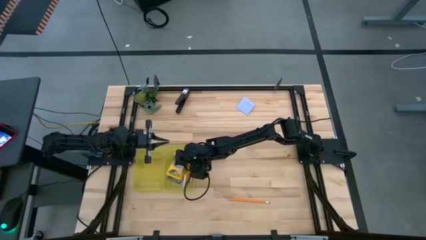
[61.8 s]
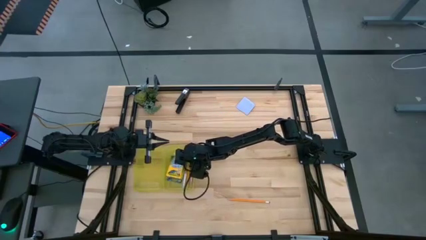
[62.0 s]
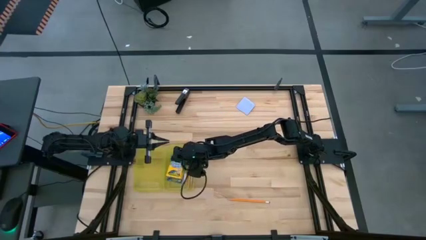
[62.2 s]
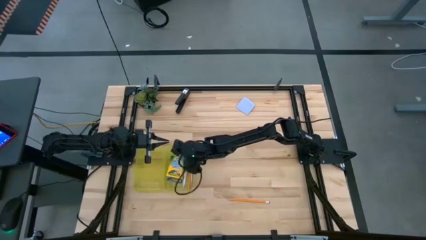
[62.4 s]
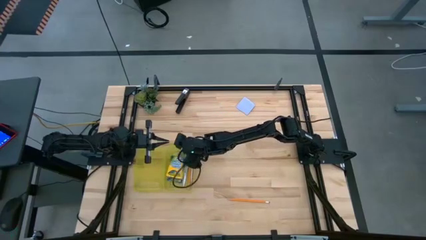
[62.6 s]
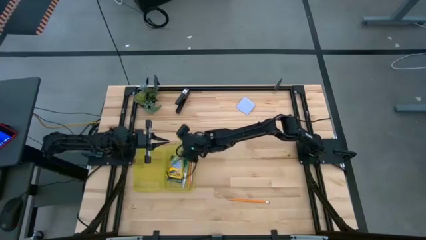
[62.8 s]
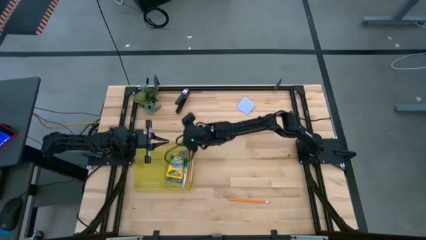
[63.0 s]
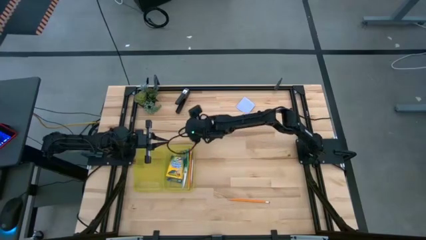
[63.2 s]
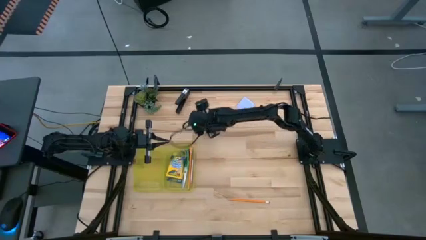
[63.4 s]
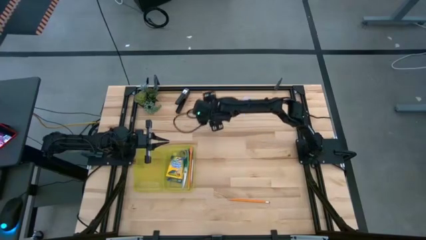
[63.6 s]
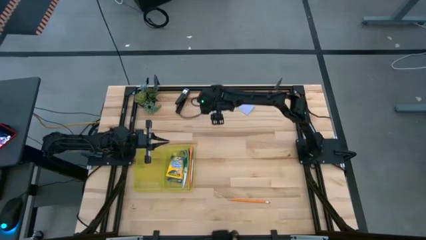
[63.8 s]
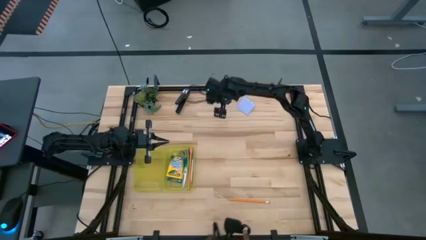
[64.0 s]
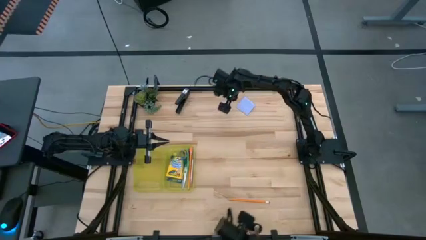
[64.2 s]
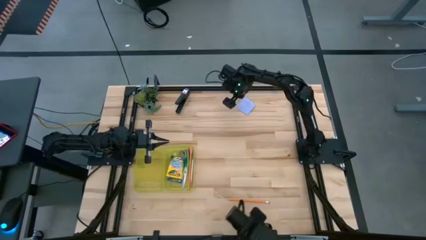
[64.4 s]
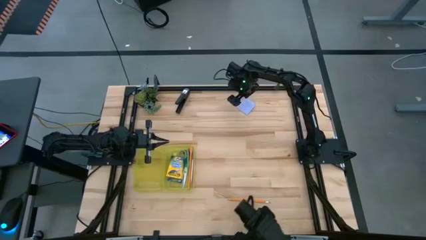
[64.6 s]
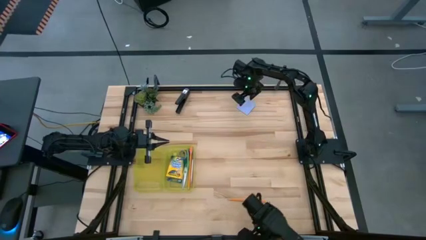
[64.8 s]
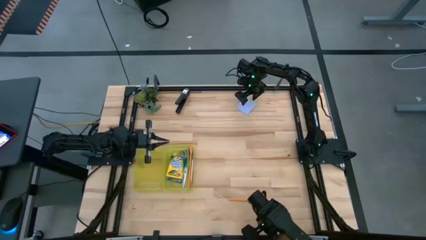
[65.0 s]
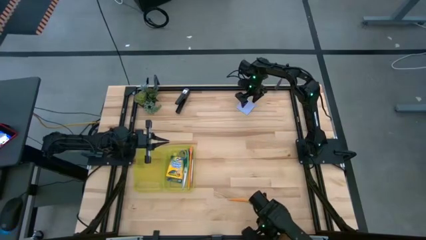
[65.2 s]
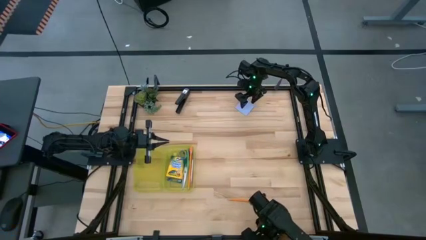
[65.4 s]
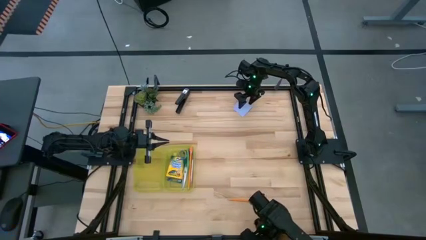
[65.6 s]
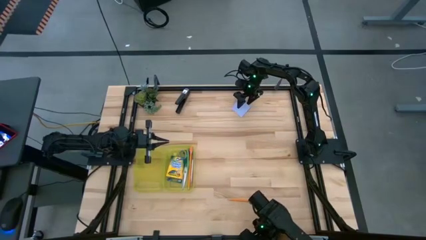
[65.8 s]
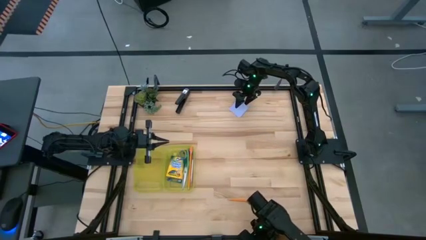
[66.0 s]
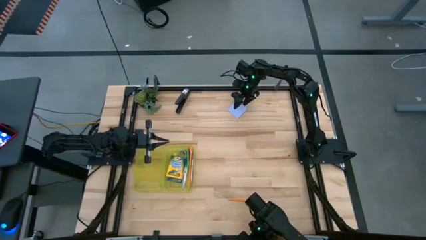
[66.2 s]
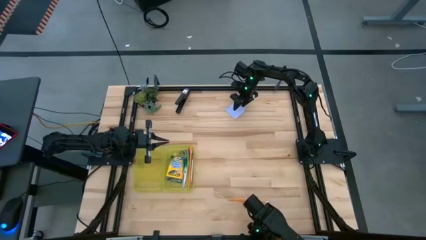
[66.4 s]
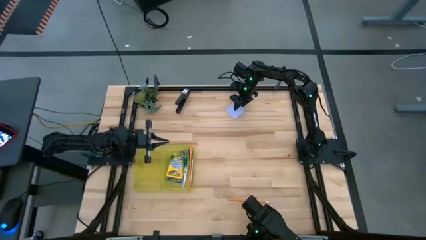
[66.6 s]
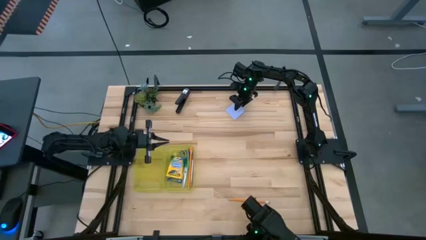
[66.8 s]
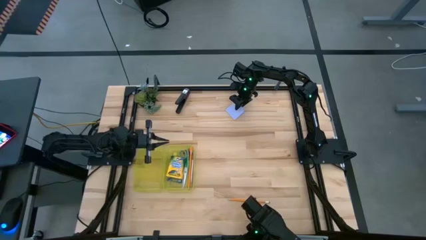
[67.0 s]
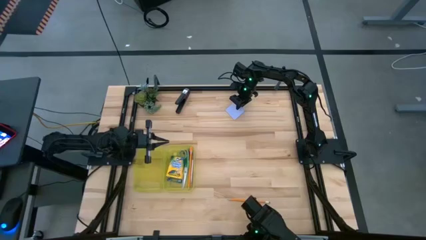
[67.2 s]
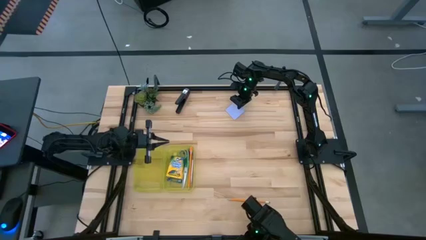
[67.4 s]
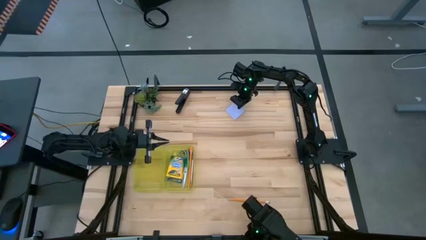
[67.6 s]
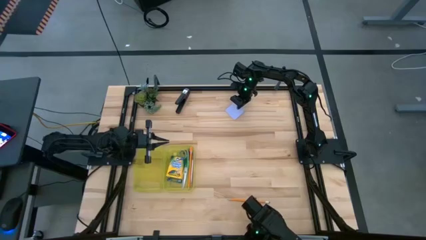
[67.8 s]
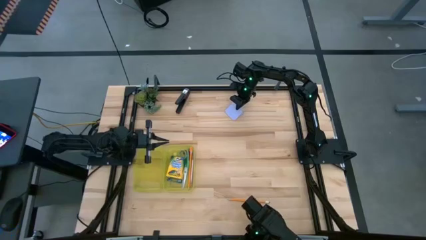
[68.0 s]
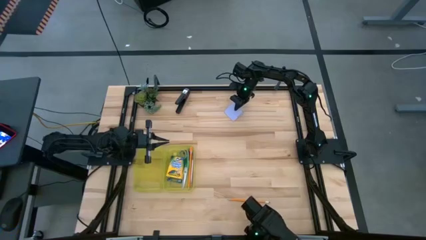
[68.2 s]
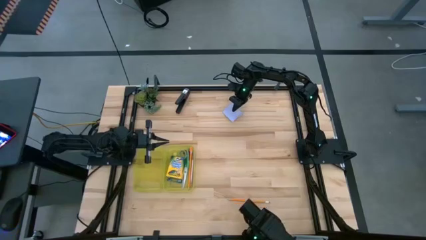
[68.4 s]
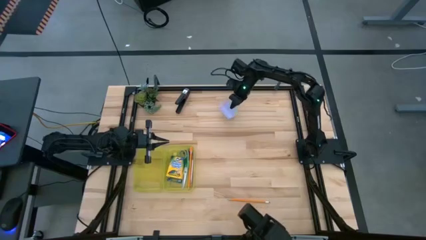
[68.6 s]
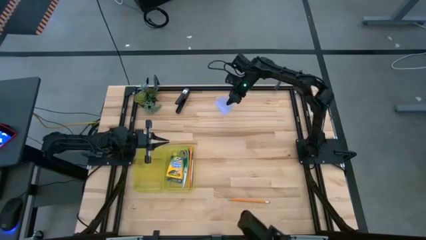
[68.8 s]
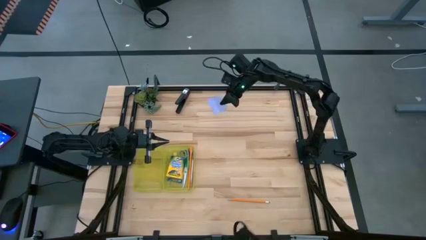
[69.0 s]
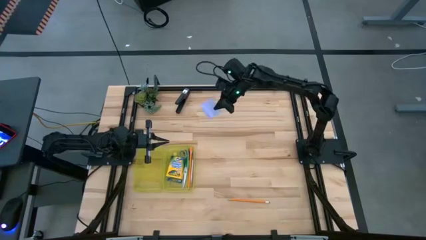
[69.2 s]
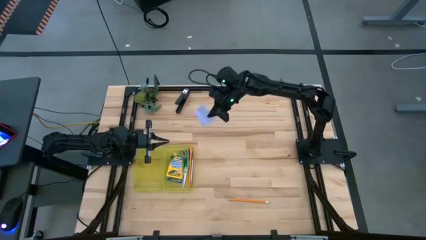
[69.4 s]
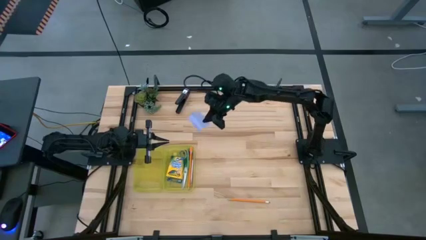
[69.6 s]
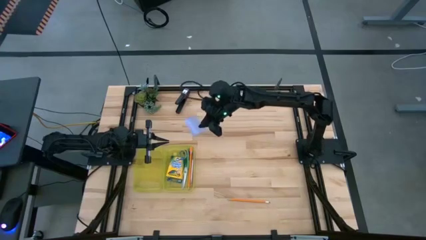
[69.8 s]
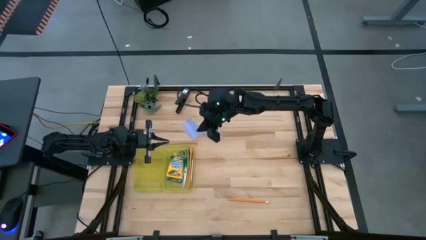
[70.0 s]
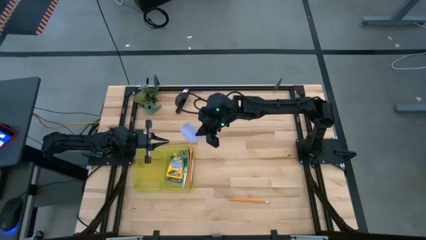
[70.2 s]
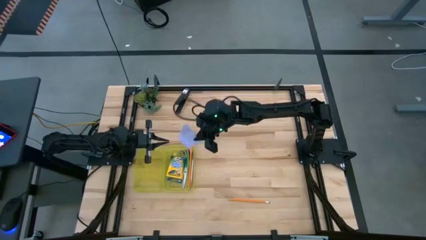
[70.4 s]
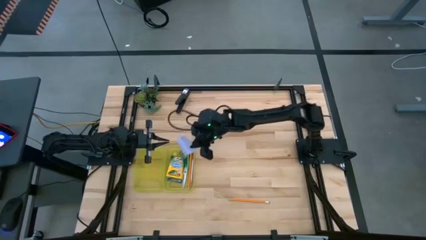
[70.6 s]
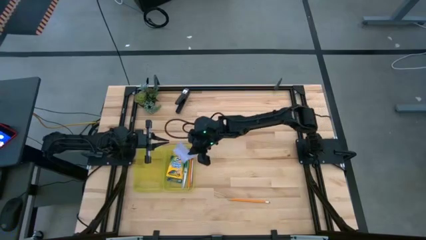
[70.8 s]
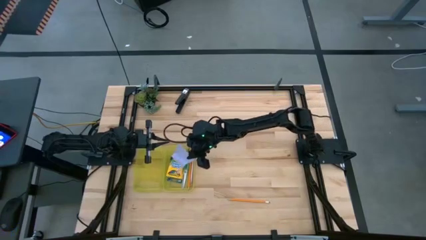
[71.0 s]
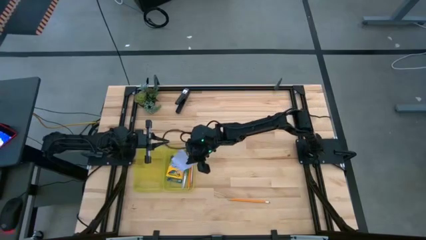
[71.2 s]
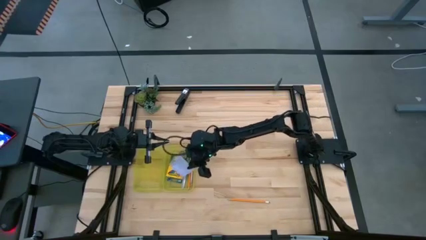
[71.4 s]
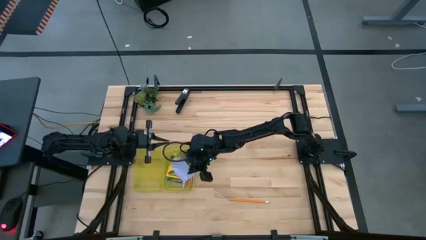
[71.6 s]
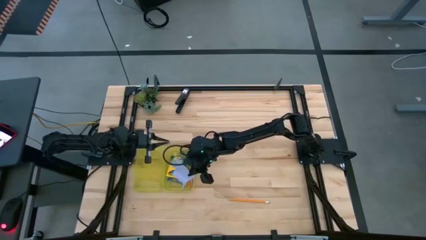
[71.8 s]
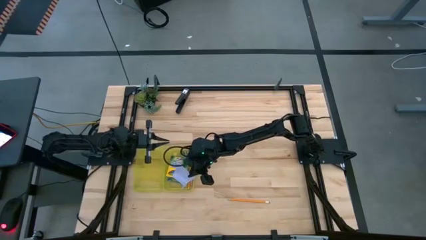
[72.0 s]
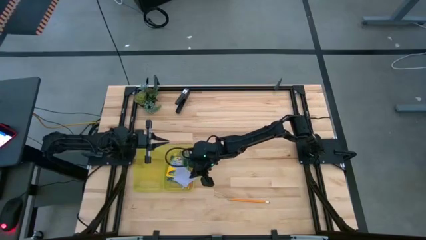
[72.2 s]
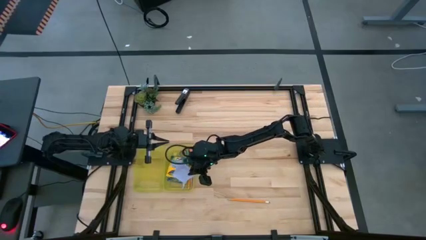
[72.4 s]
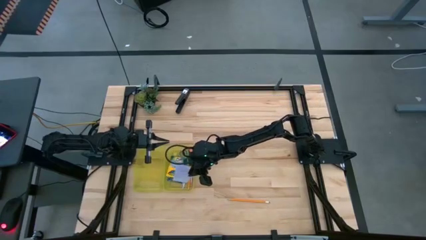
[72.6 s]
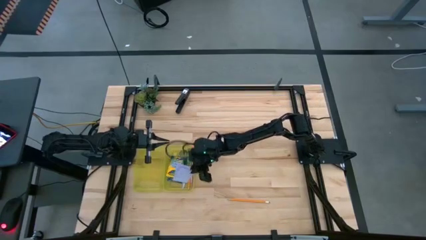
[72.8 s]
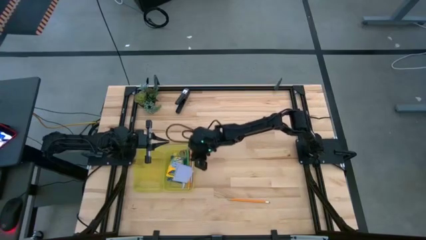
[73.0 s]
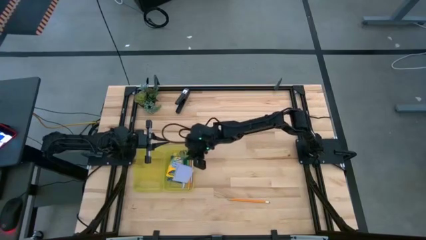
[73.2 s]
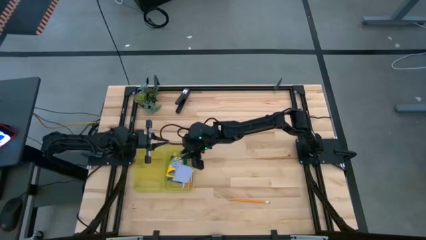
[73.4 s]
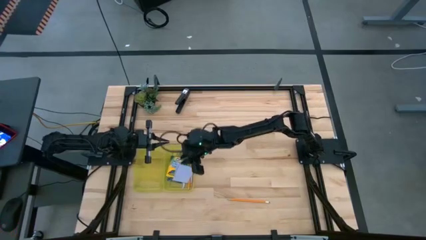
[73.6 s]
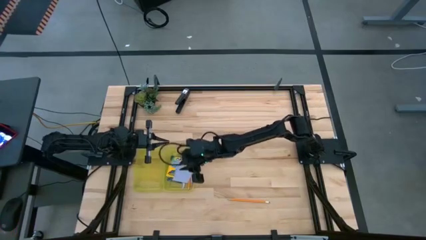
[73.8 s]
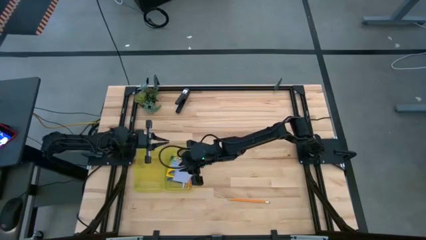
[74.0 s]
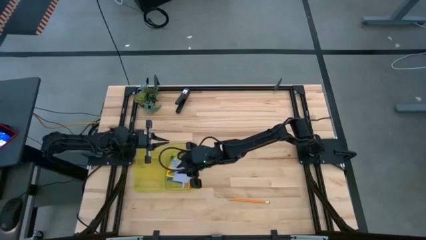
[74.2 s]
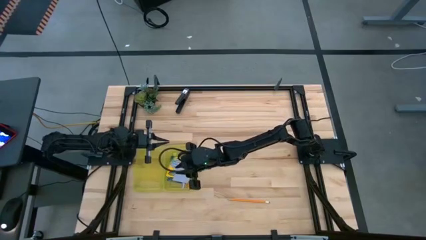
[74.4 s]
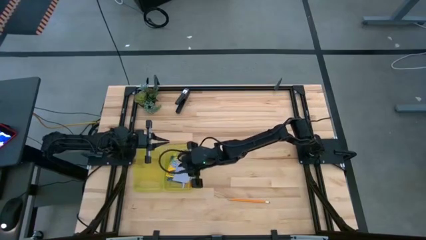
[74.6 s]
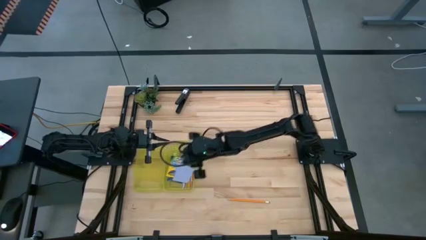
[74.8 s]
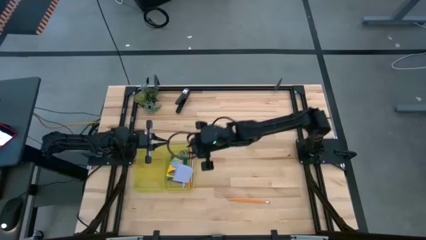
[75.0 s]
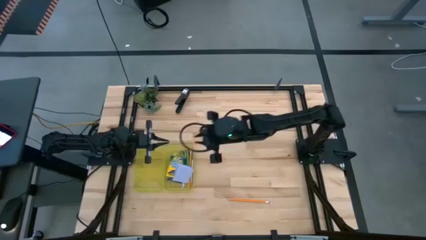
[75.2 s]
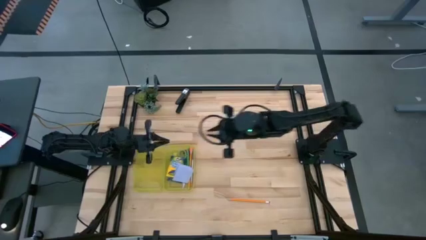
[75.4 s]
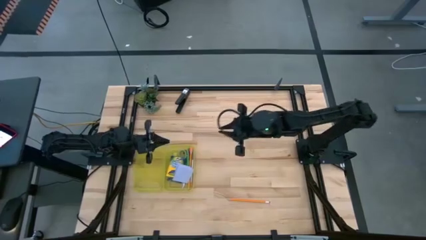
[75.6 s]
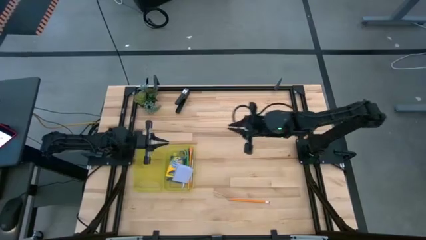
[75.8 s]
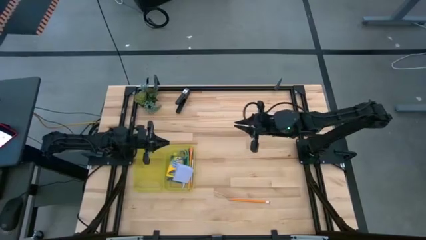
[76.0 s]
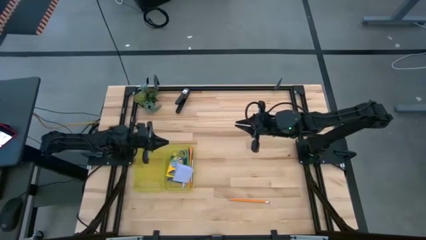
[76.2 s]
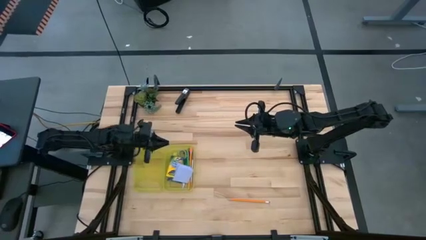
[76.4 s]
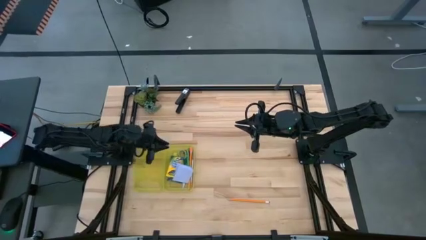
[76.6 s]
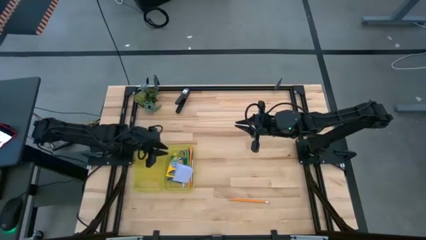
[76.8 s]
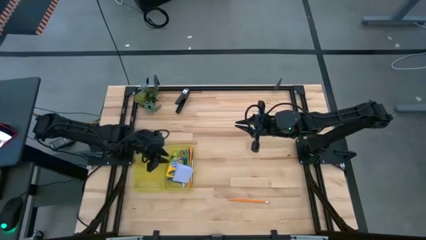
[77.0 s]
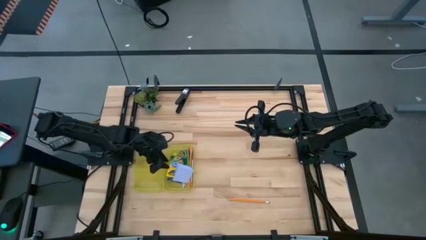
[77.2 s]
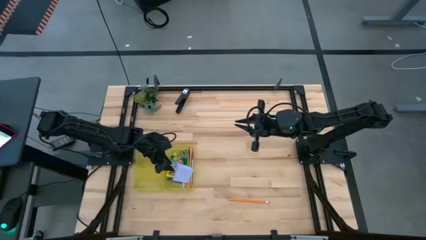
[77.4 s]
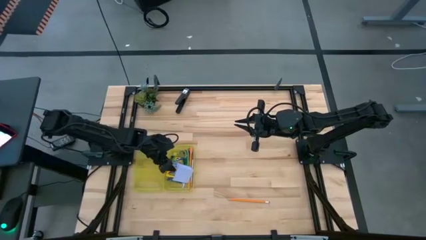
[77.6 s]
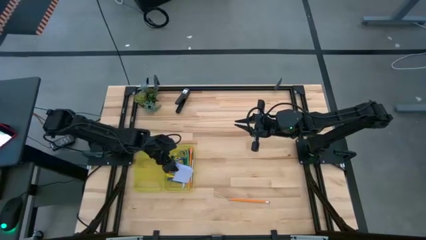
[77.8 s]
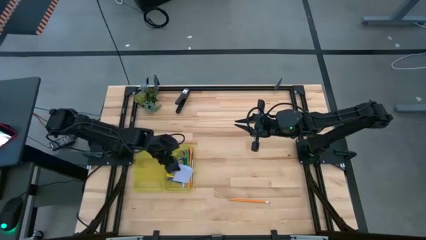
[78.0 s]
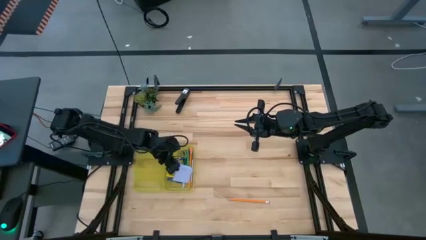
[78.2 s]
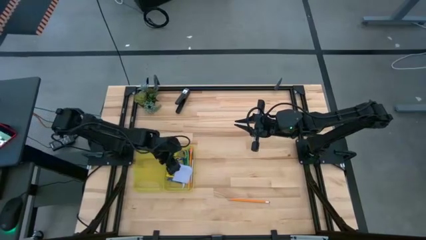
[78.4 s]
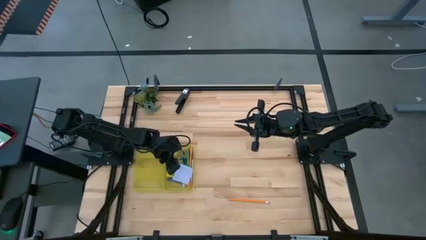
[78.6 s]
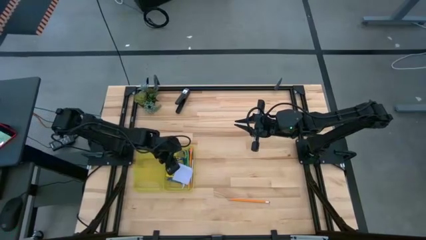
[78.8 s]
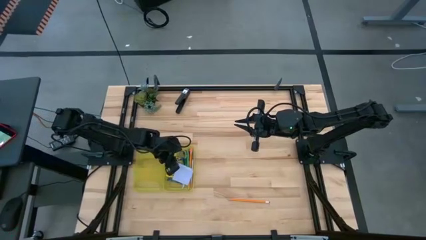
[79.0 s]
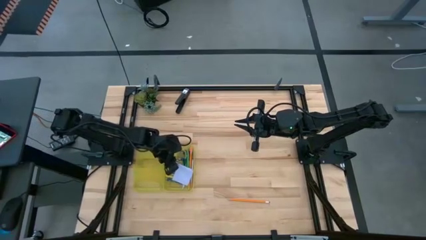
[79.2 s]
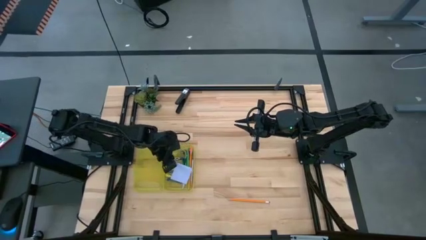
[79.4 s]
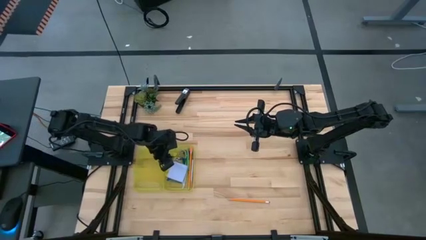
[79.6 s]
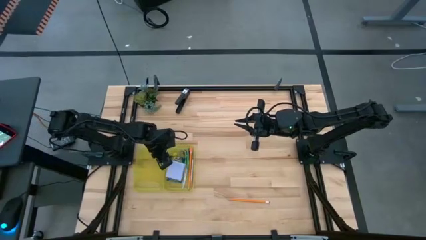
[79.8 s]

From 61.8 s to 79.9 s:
Task: Pack school essentials
Put the white sticky notes into the yellow pencil box
